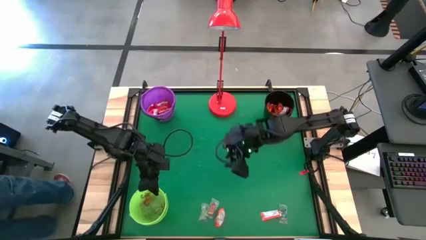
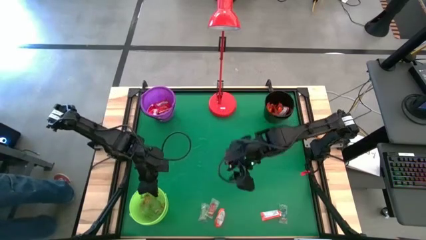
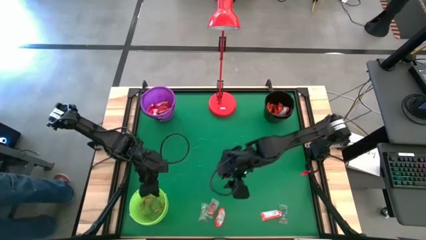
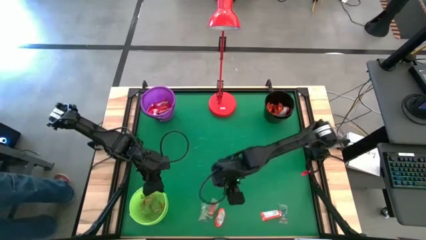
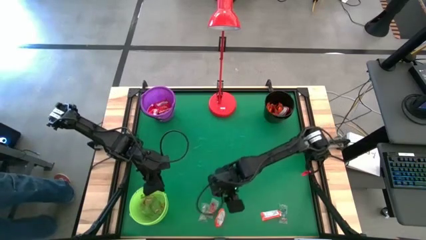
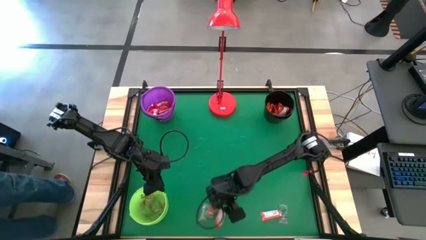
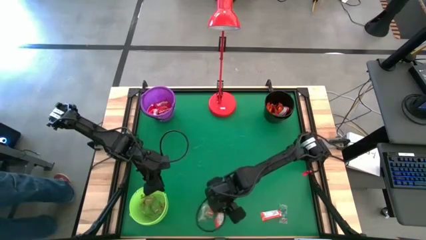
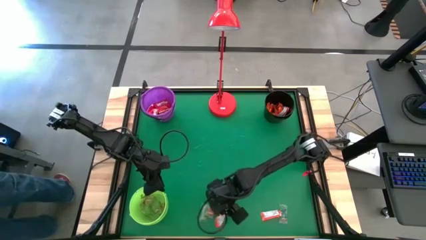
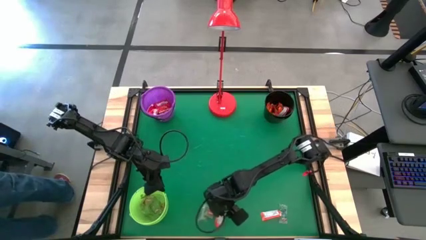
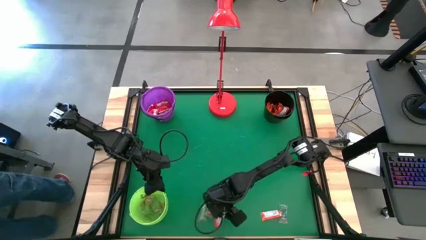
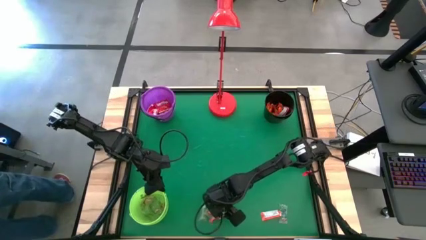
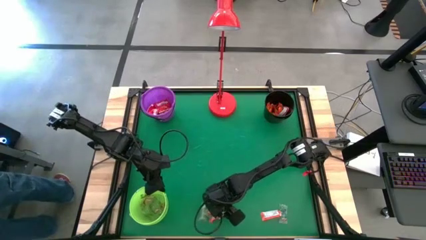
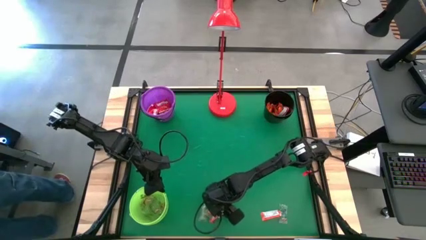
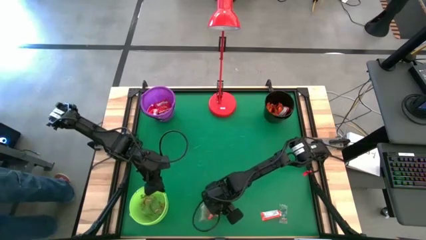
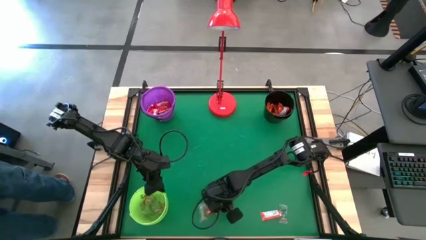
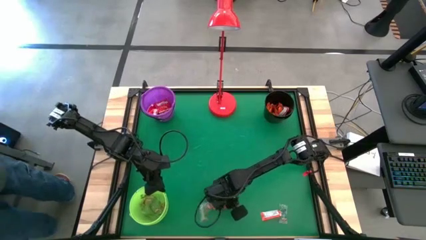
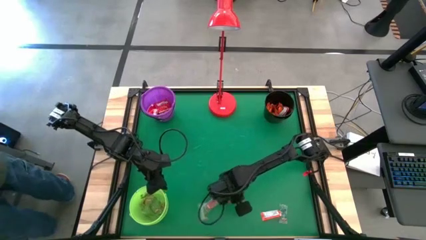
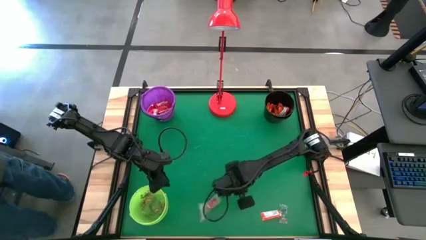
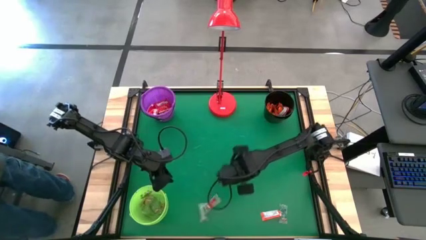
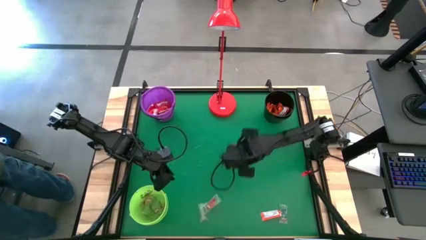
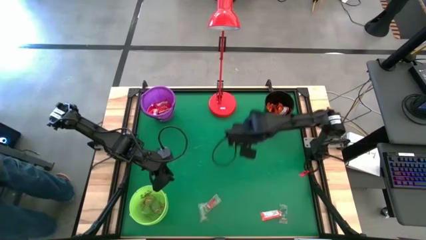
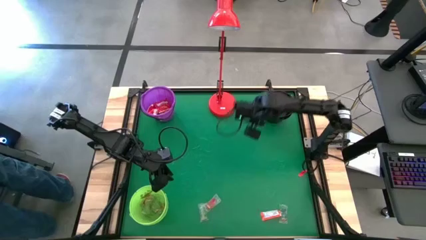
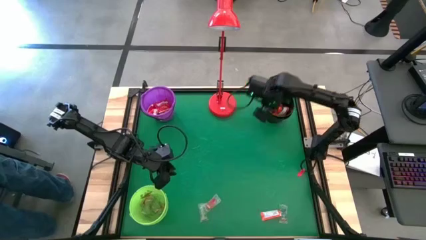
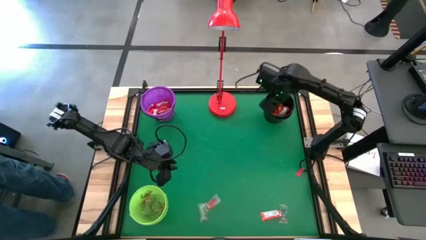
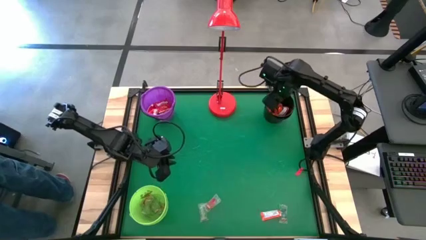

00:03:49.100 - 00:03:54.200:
Task: Sort candy
Put the orange chocolate into the black bucket

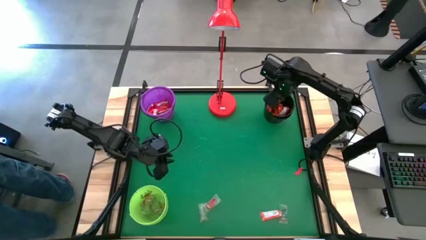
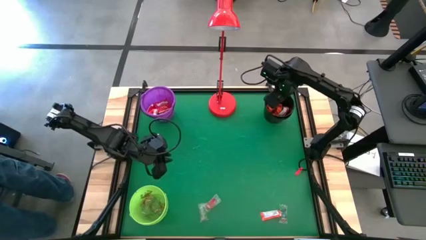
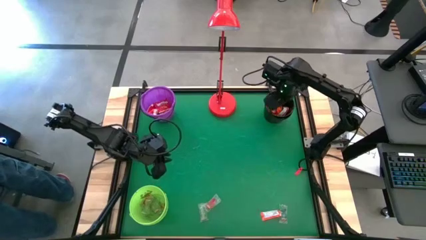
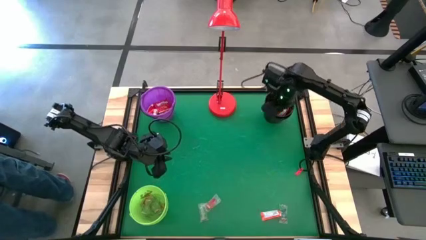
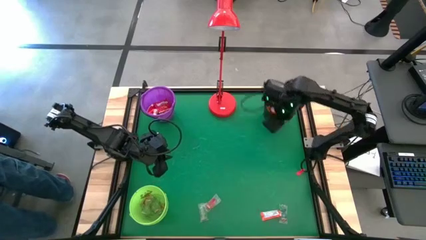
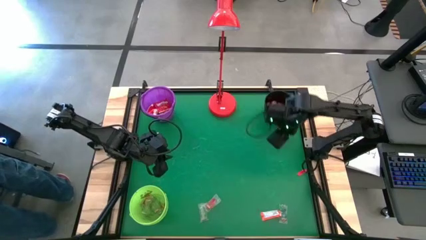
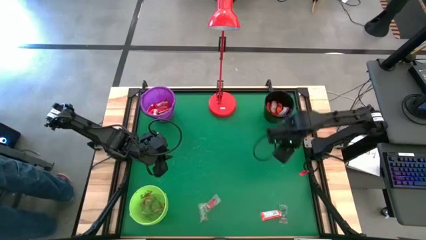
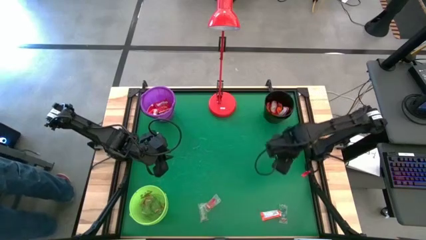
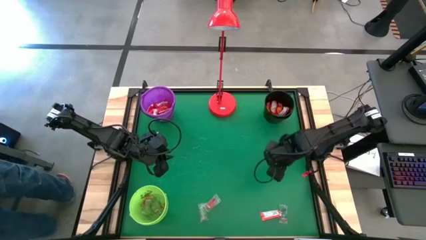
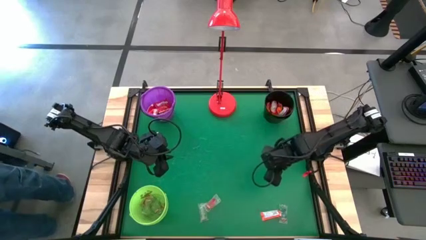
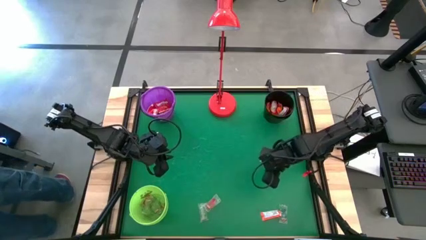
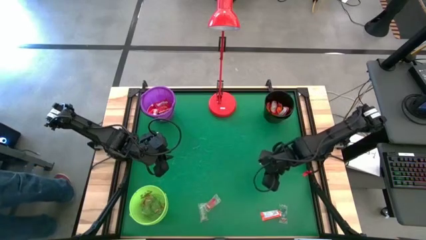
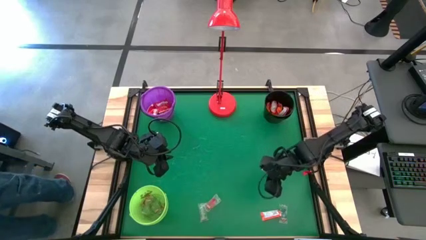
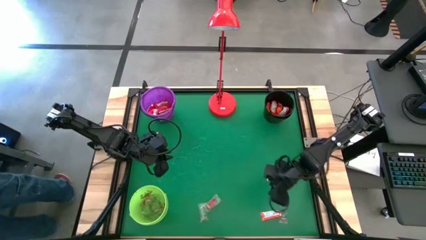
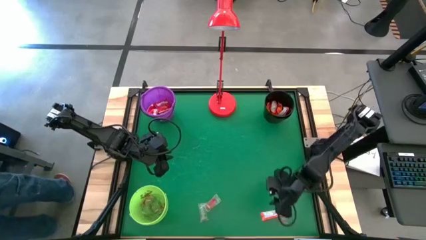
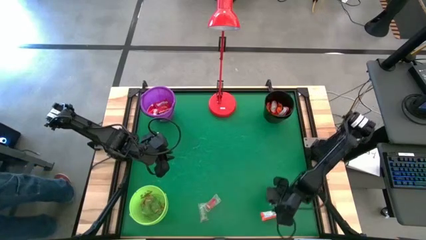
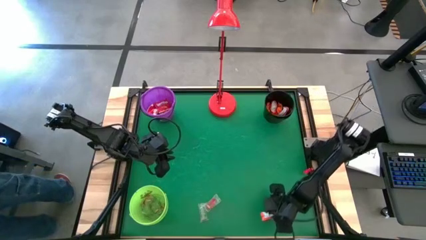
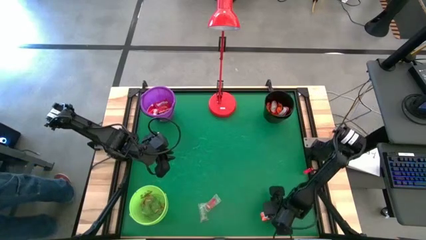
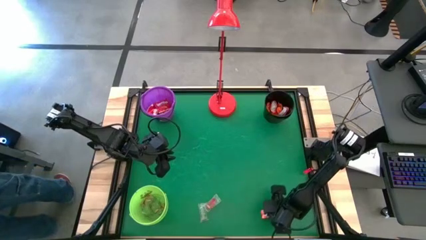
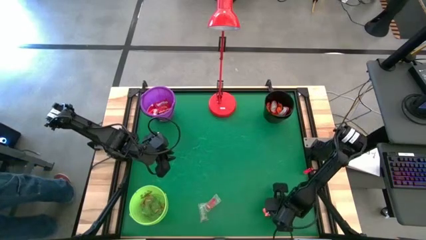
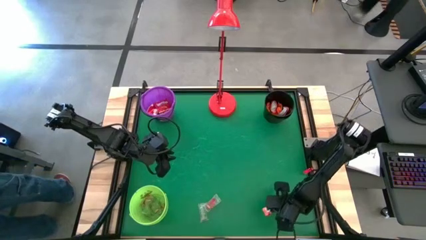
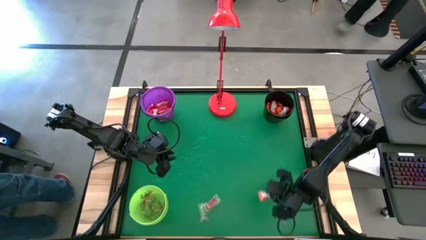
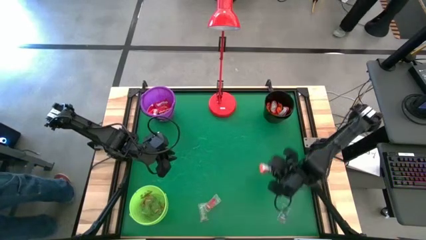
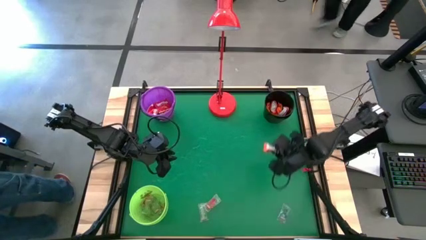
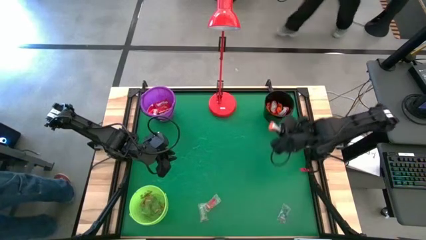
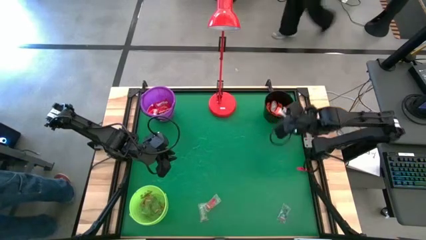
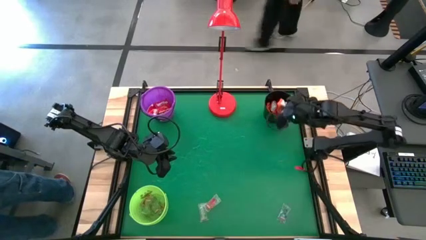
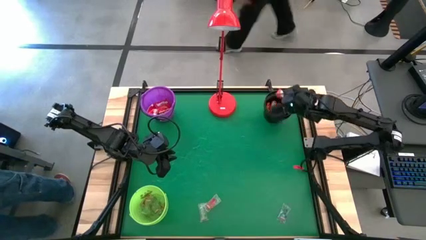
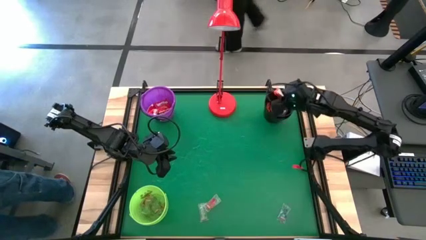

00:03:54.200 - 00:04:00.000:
Put the orange chocolate into the black bucket

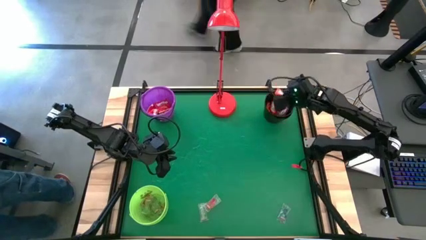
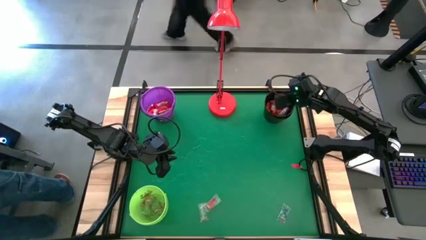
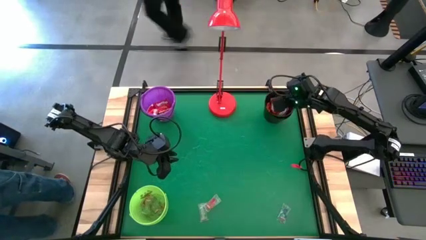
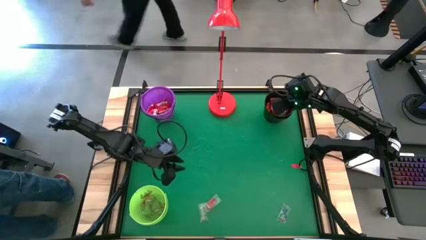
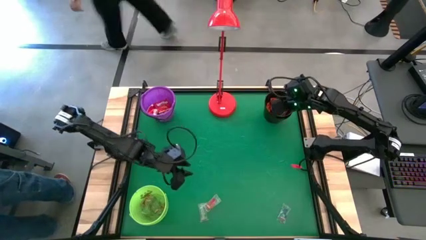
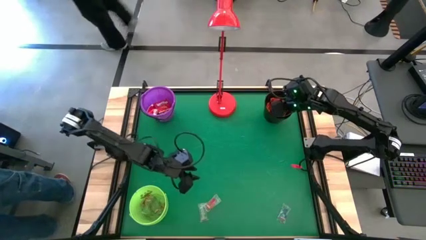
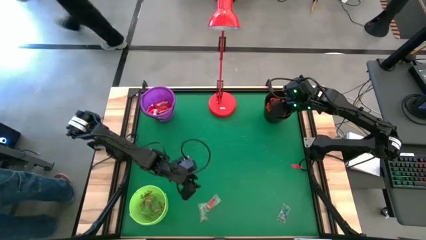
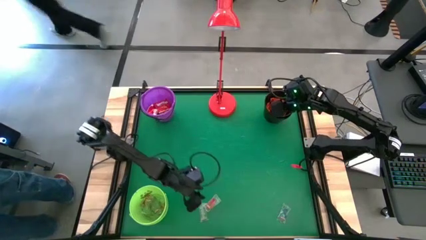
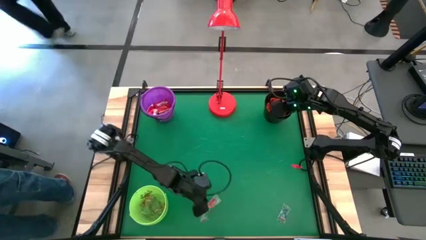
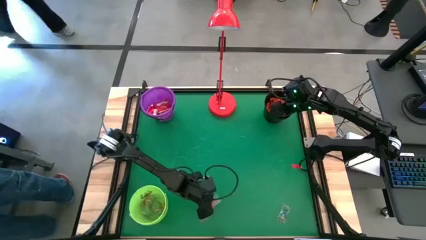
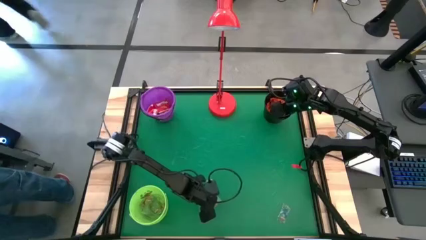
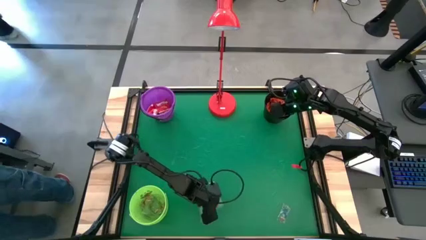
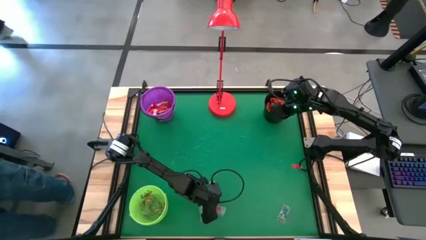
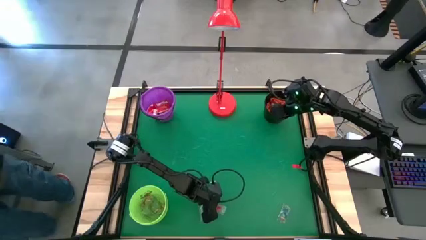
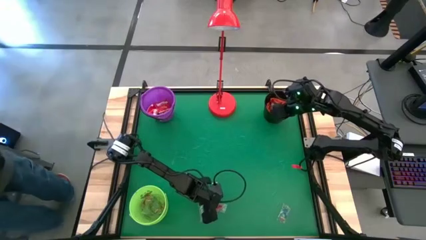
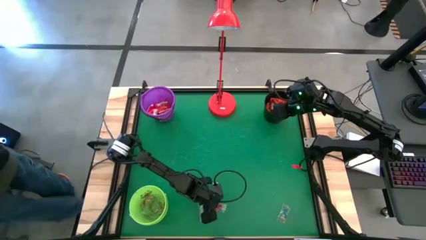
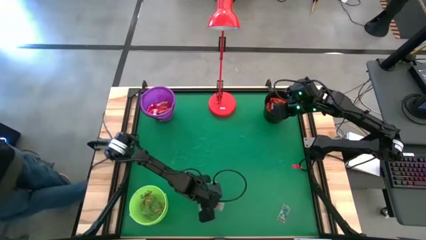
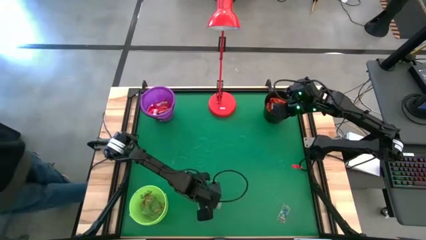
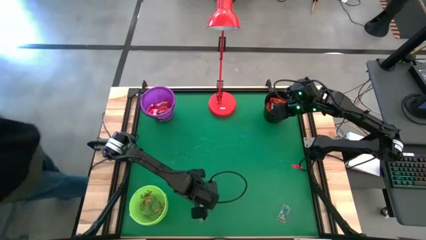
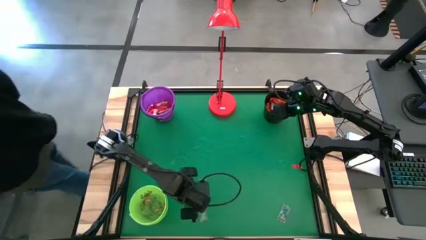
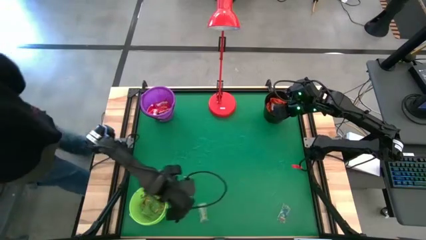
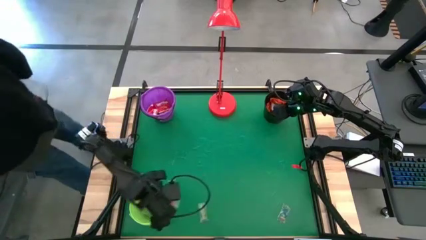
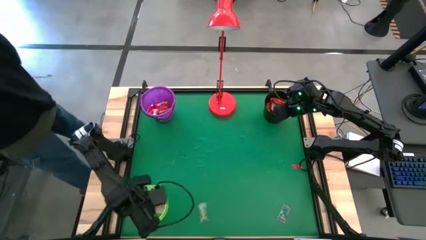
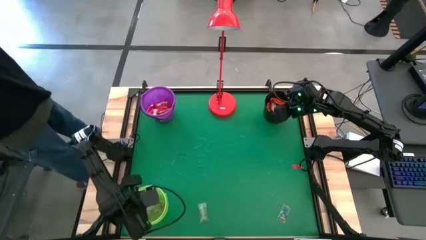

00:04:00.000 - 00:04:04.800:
Put the orange gummy into the light green bucket
